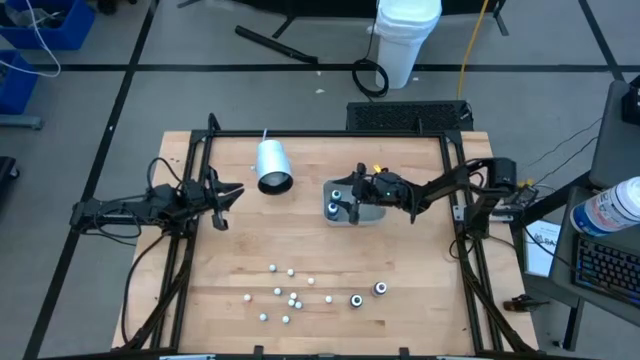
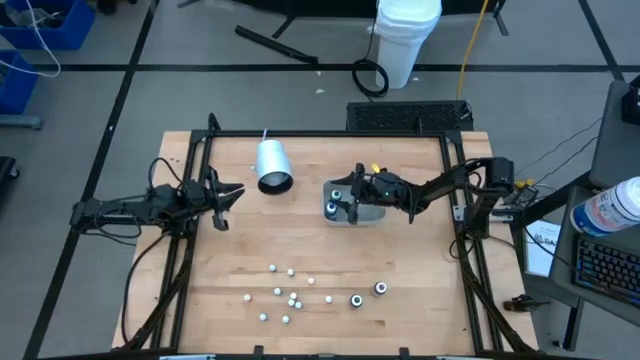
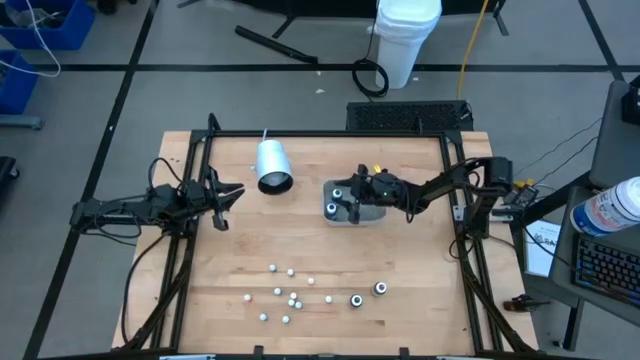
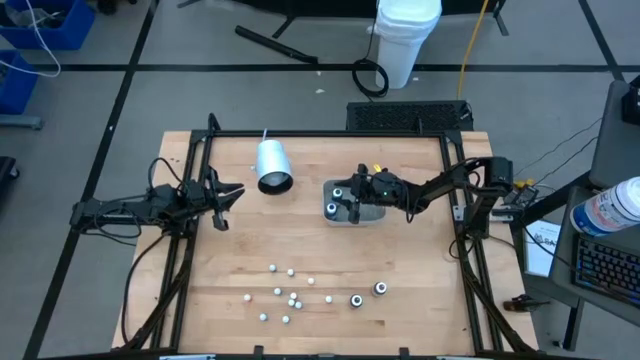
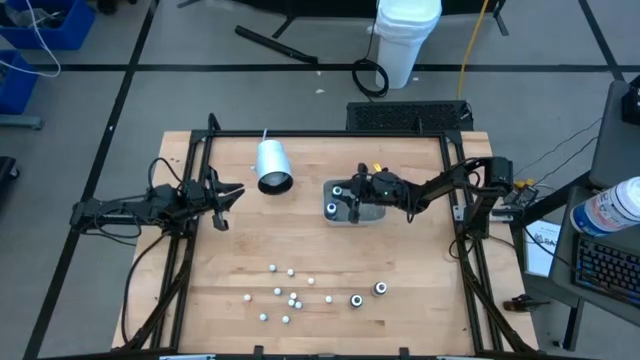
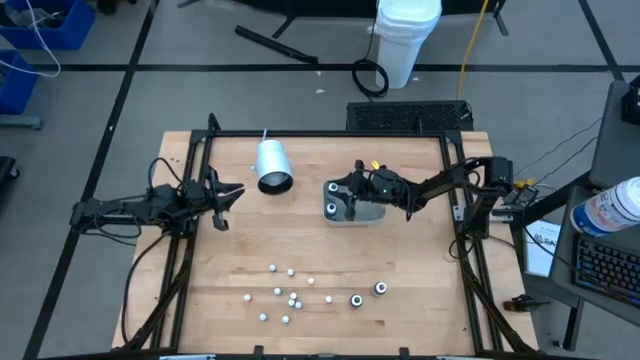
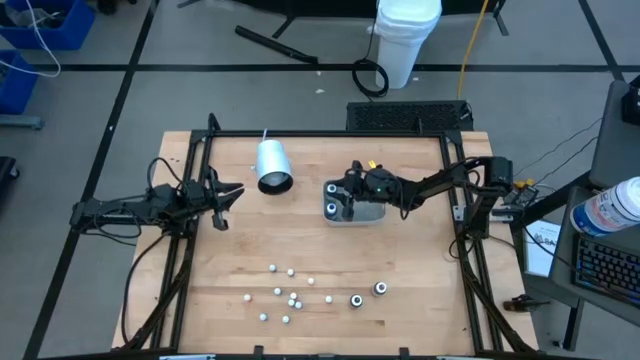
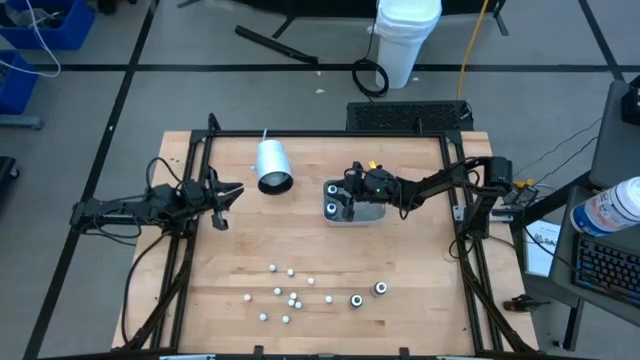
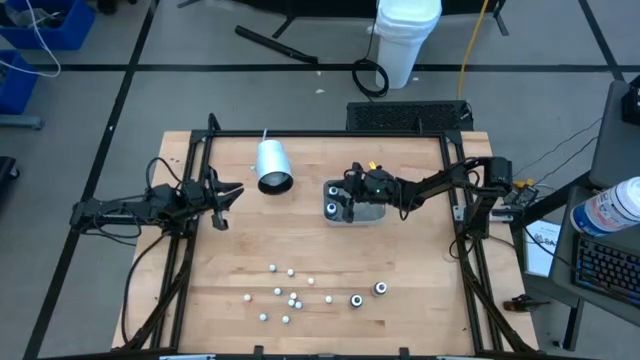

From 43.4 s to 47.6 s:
Task: Pick & Place food coloring
Adjust the green food coloring bottle in the gray bin

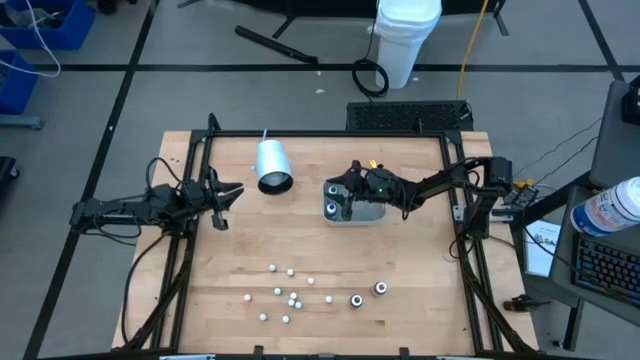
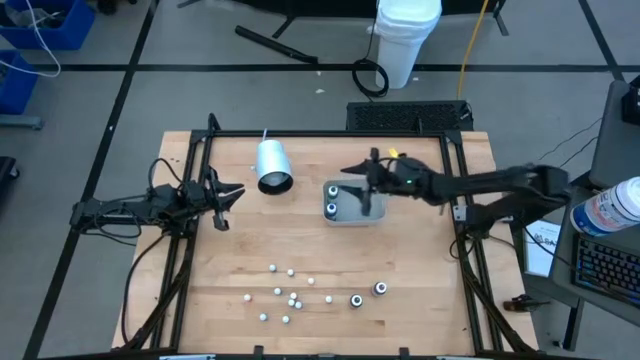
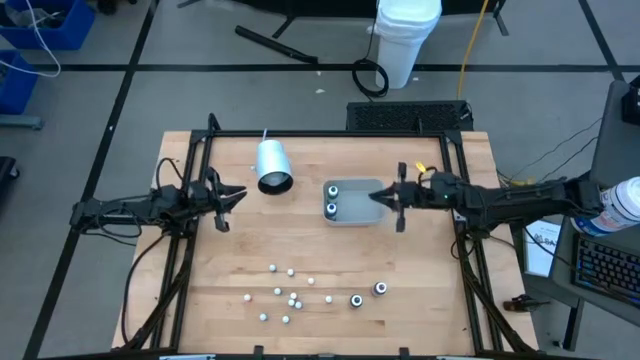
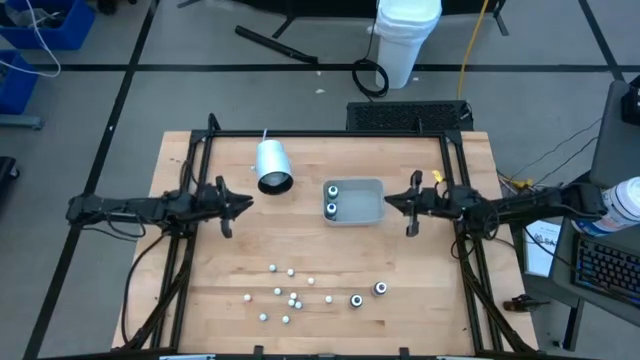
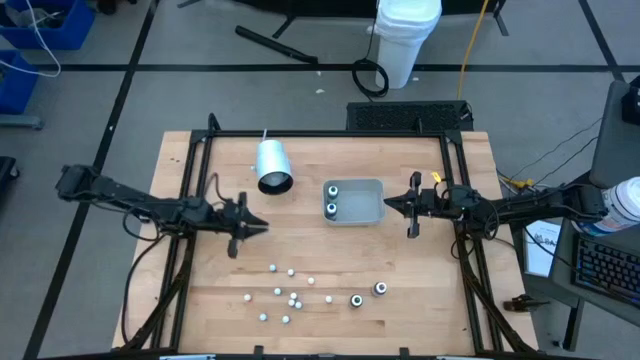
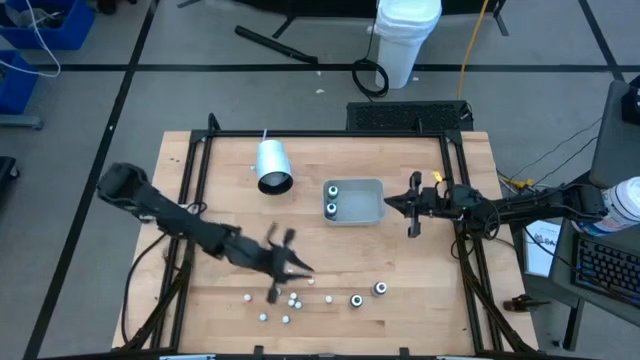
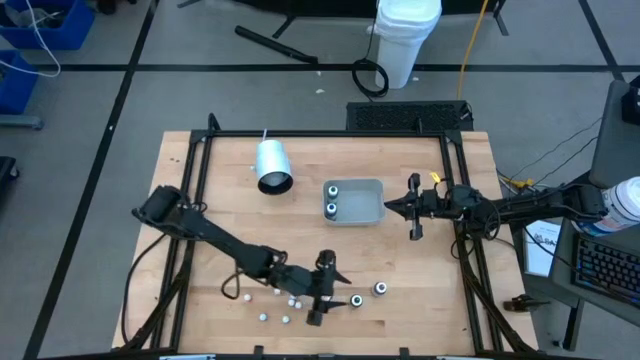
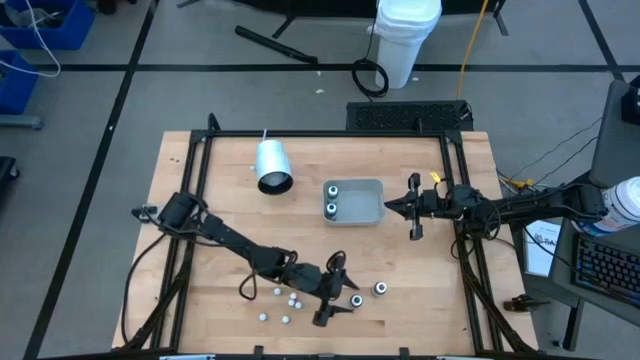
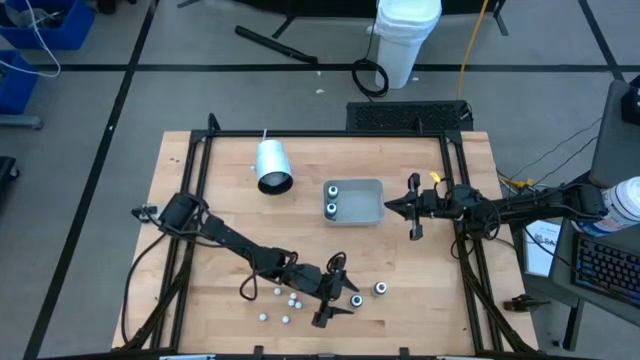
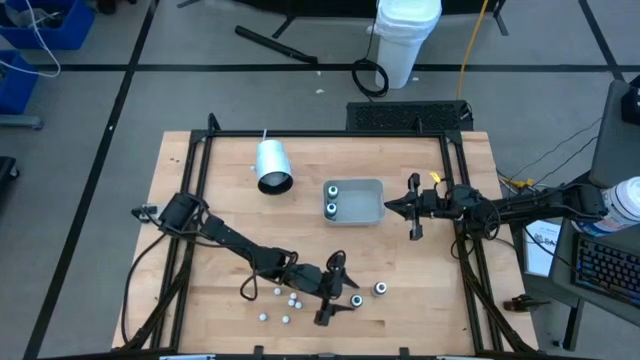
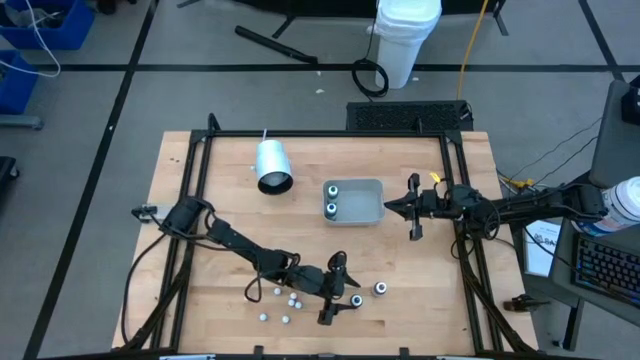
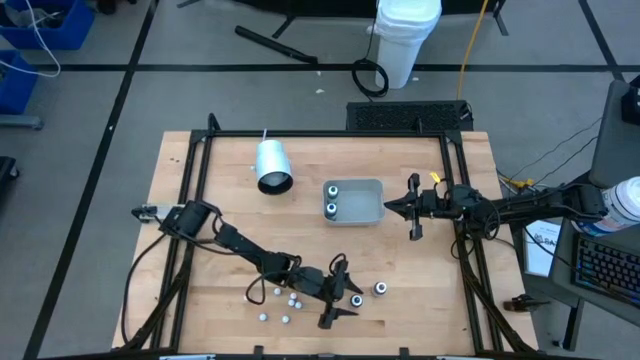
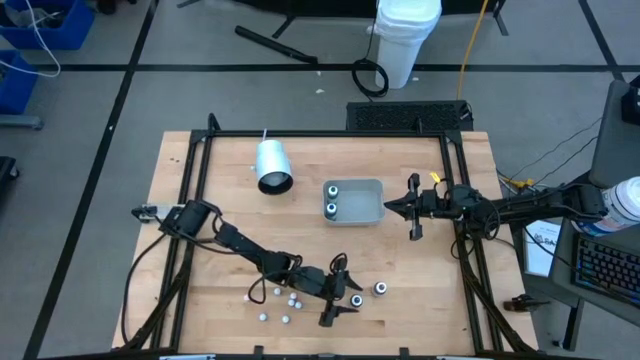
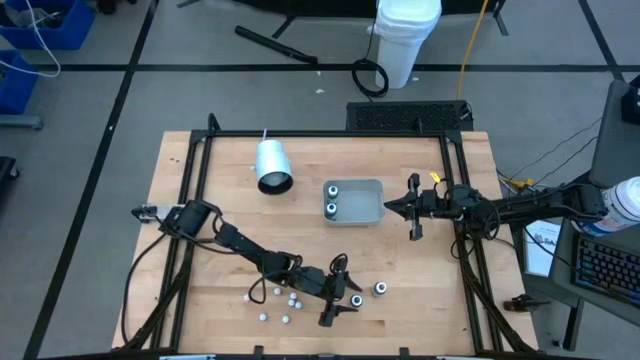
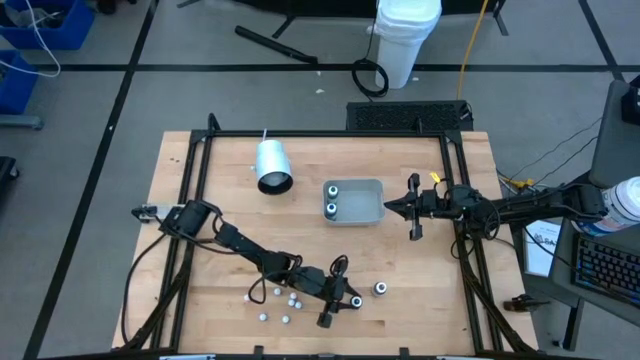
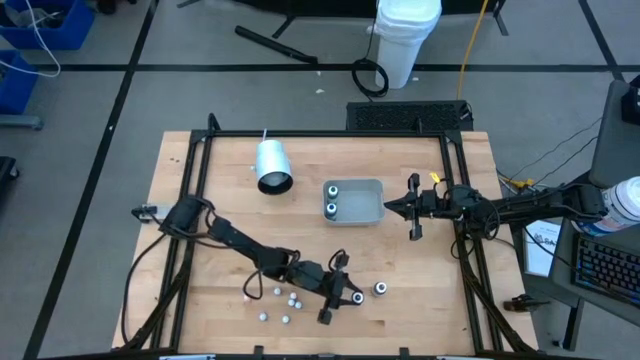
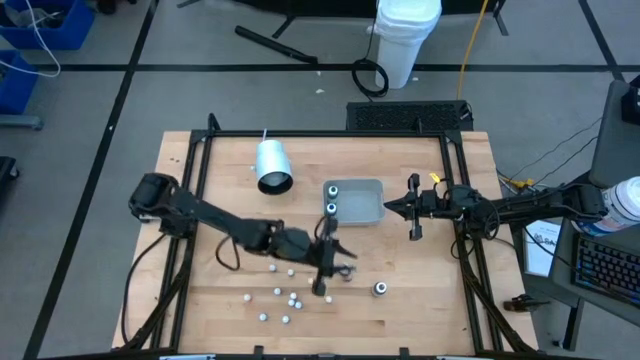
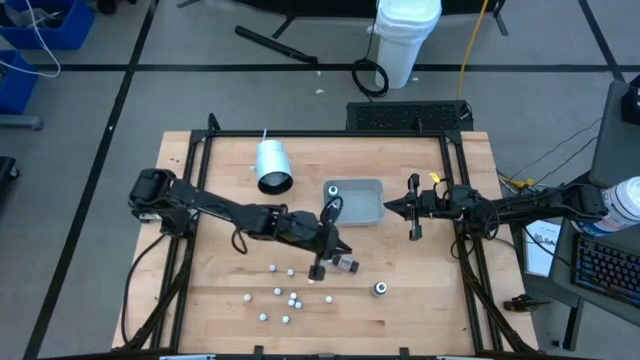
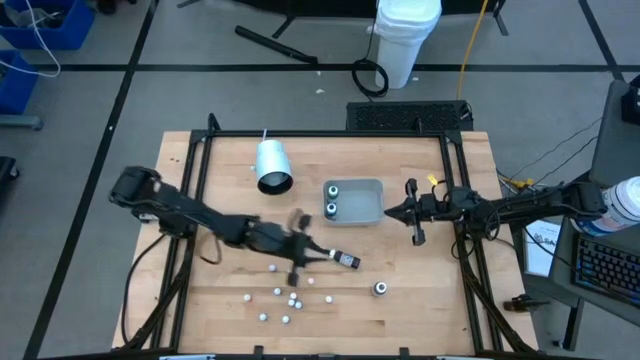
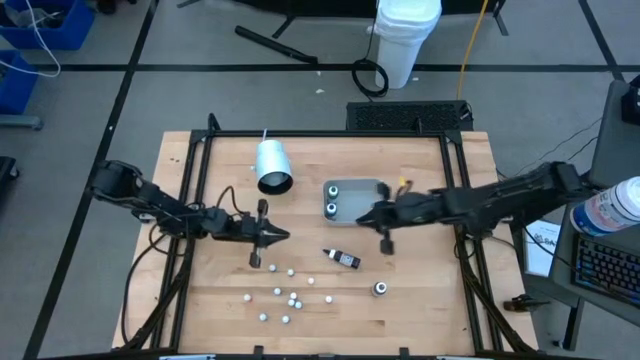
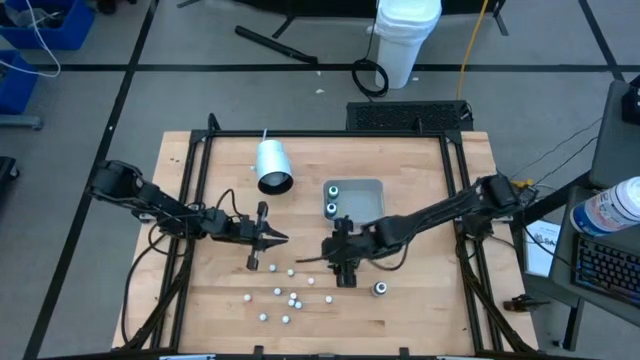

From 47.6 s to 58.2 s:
Put the black food coloring bottle into the gray bin
